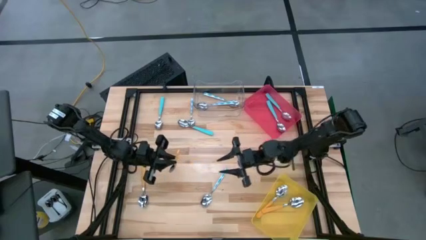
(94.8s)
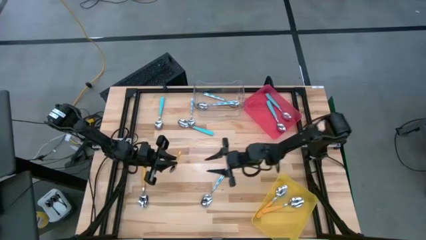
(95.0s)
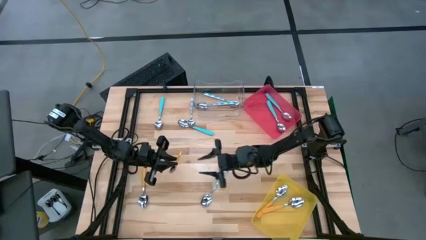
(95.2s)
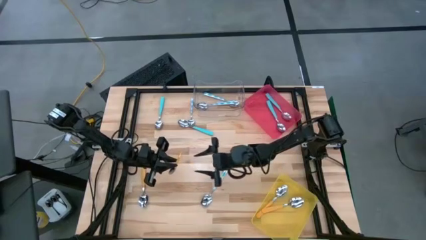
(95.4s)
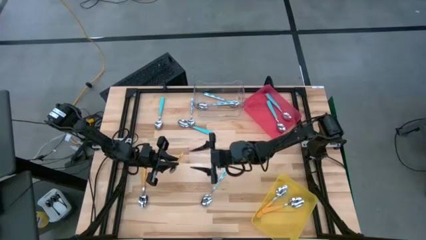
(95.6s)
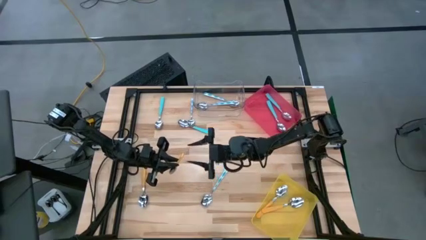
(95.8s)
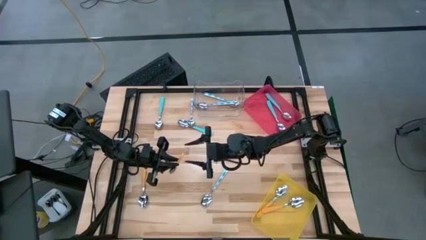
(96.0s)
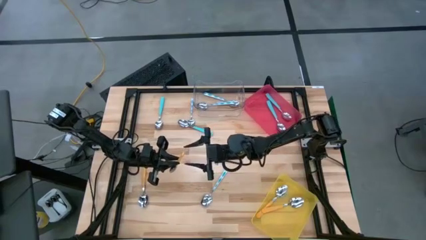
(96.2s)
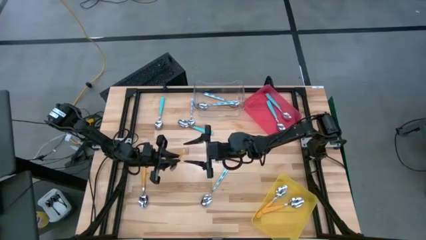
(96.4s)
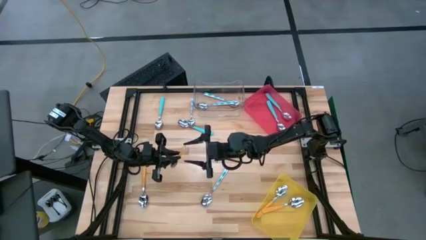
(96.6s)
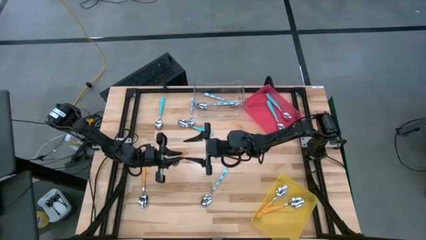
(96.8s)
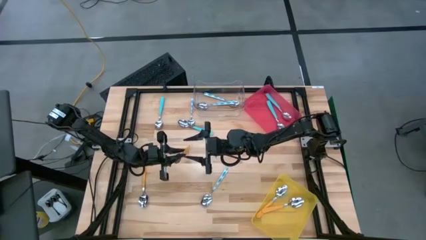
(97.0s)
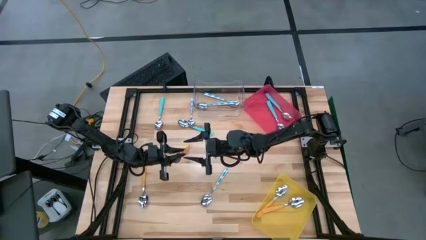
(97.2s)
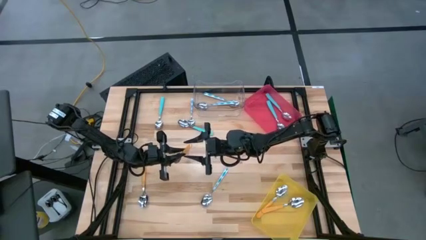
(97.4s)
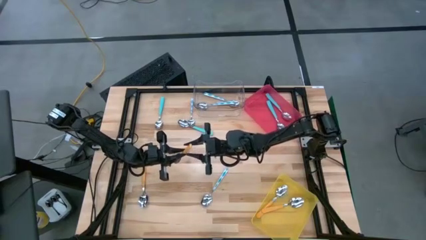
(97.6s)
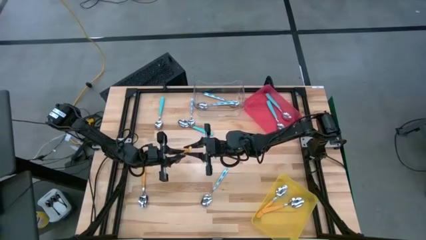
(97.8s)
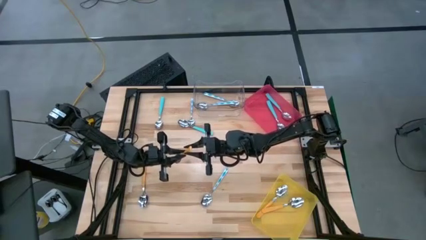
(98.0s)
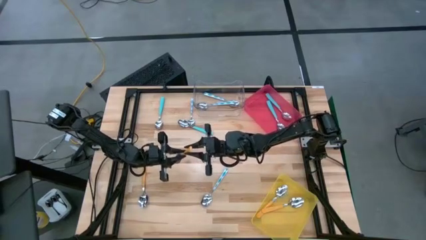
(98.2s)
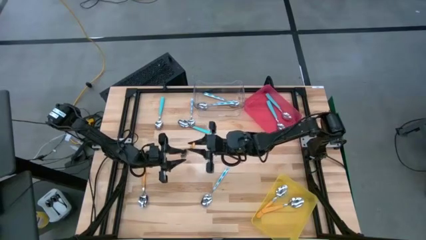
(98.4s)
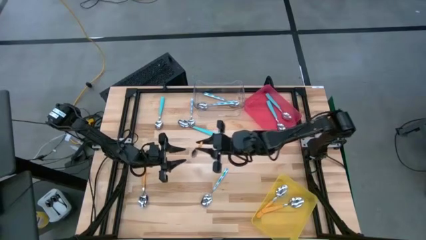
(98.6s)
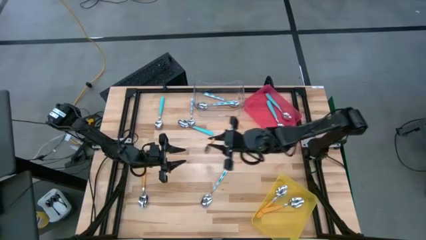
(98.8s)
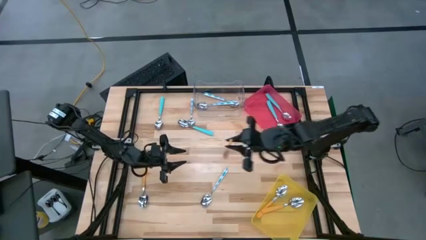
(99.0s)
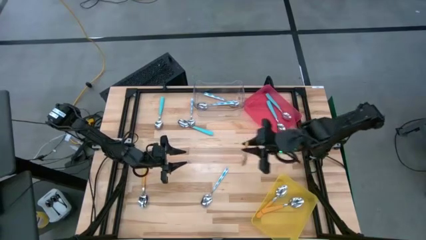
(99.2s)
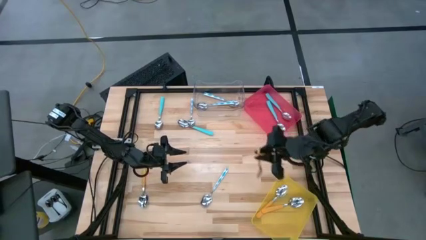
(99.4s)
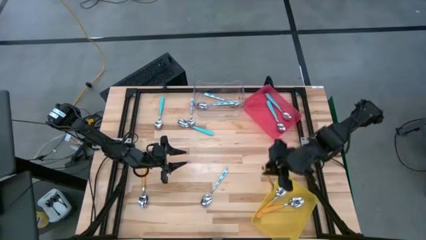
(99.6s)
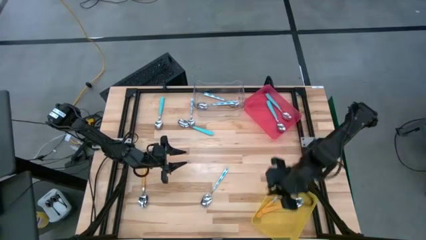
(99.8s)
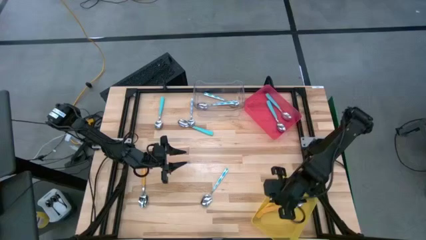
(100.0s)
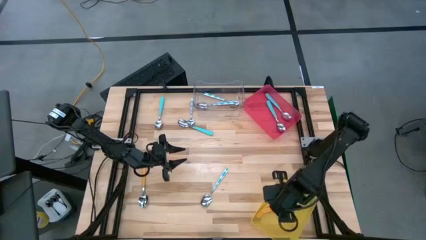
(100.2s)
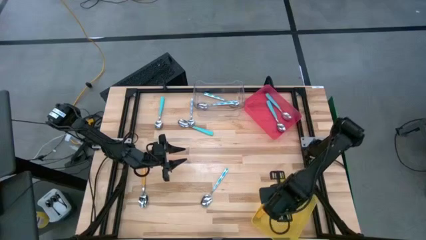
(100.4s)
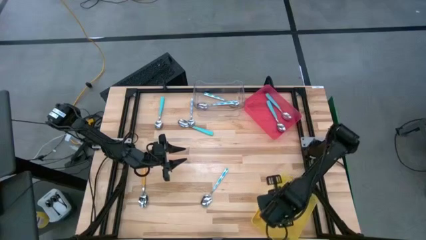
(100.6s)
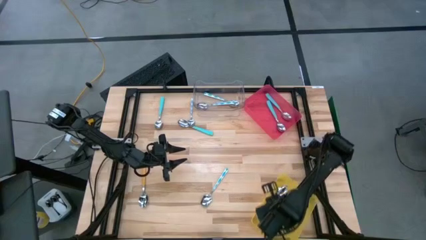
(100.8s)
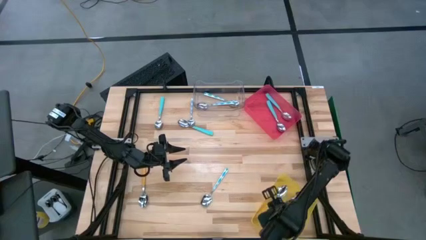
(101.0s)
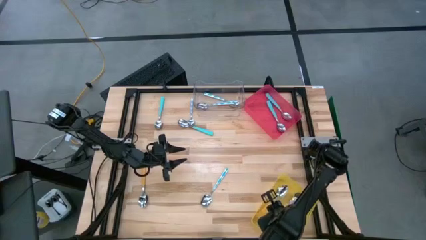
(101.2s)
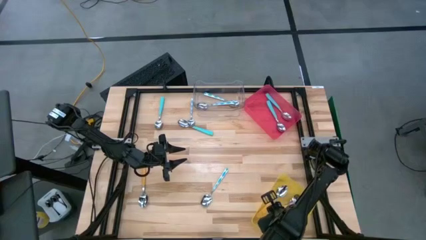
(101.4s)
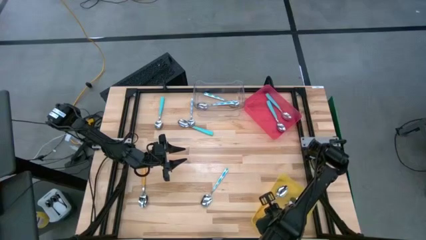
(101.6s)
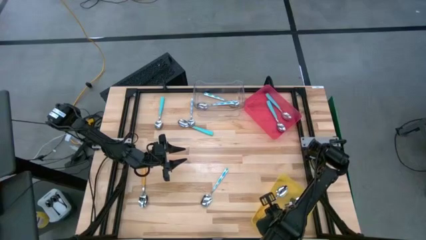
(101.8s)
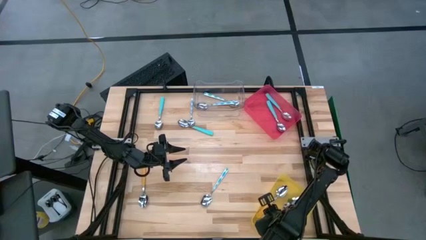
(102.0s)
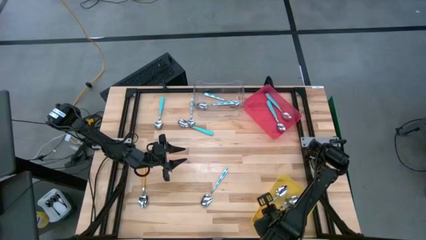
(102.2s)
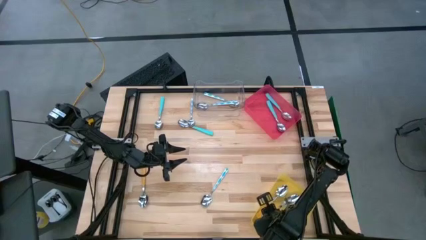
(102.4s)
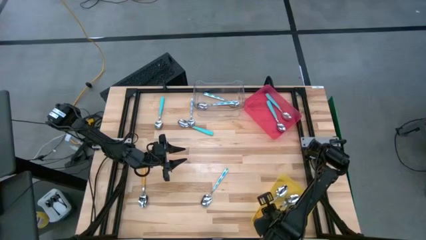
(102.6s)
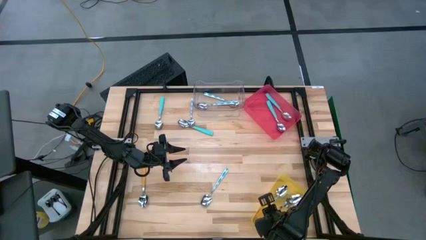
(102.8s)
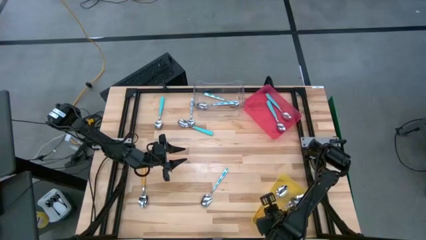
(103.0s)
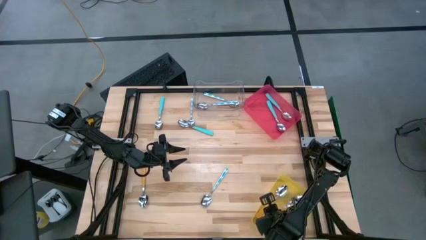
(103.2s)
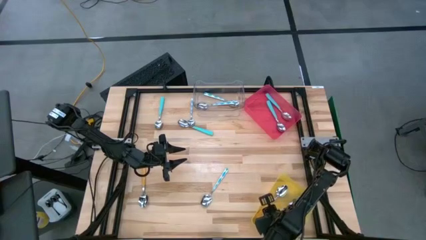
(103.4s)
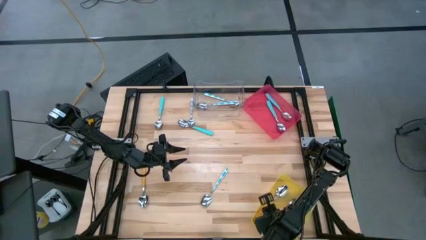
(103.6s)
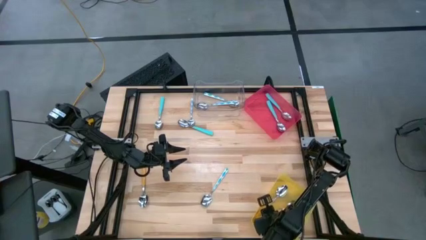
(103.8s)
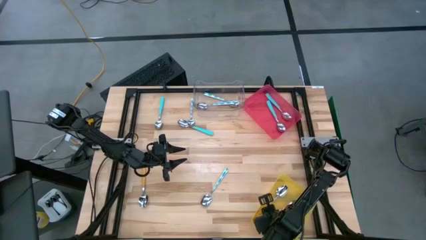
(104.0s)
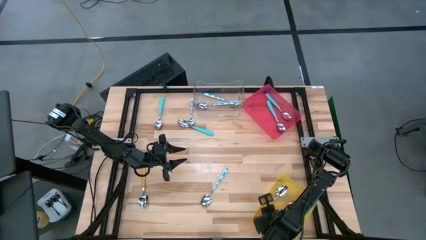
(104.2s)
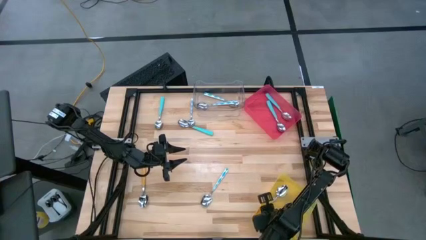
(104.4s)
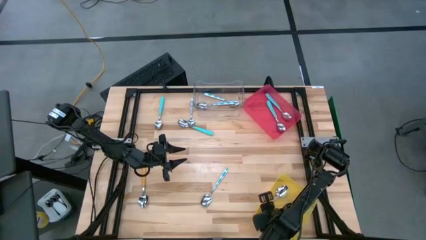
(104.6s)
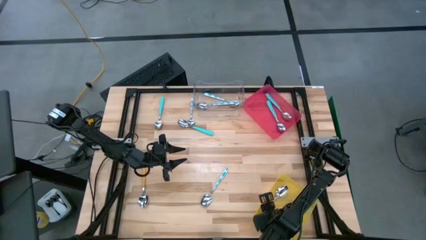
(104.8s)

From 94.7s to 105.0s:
Task: Sort silverware by color (type)
Put the orange spoon into the yellow bin

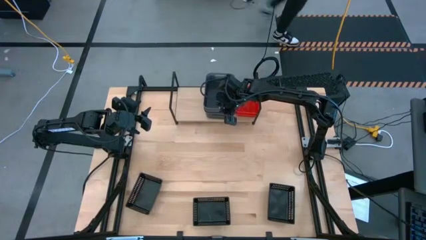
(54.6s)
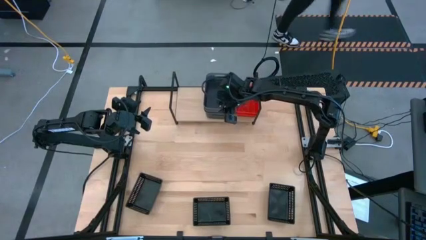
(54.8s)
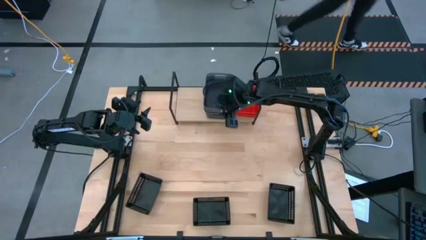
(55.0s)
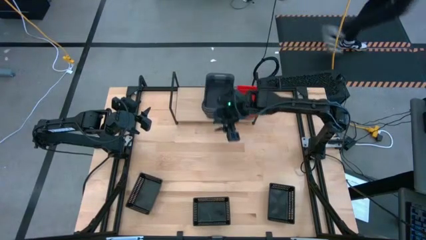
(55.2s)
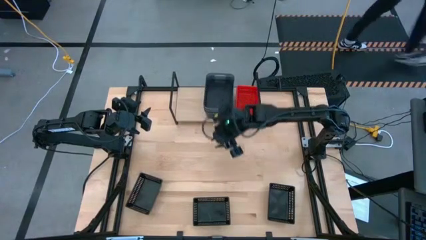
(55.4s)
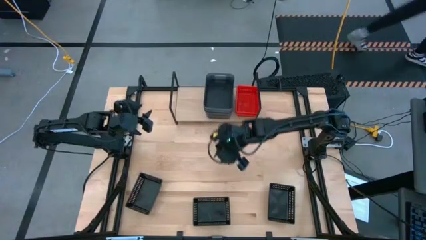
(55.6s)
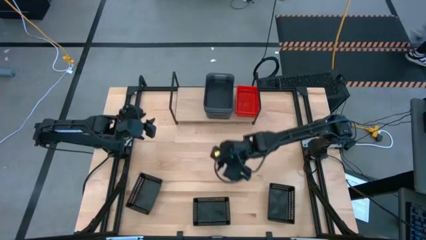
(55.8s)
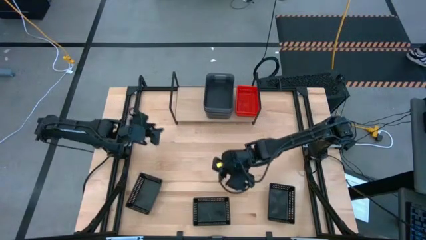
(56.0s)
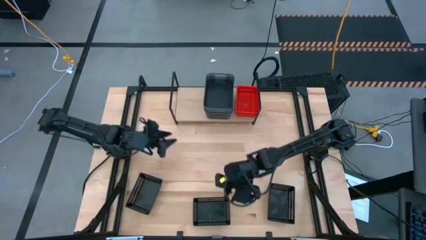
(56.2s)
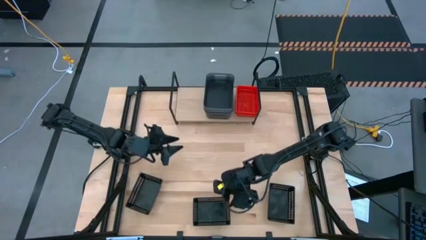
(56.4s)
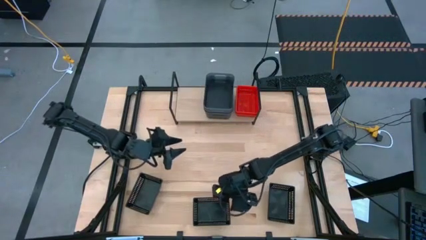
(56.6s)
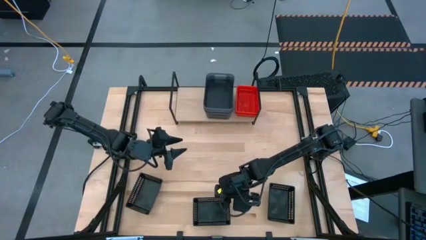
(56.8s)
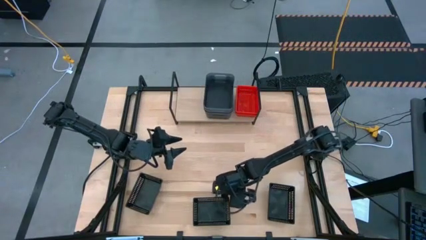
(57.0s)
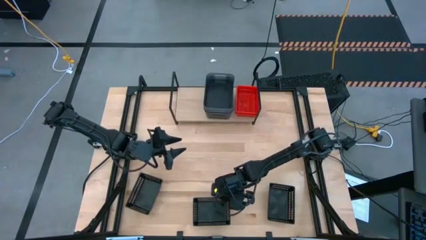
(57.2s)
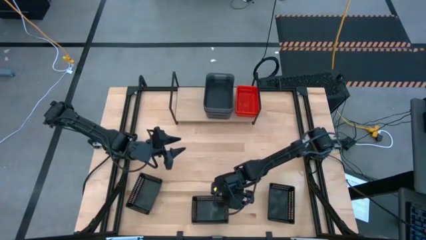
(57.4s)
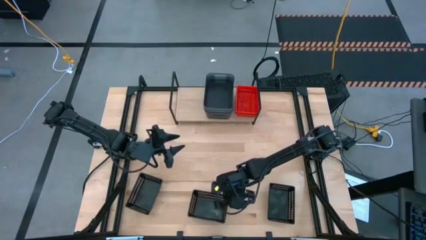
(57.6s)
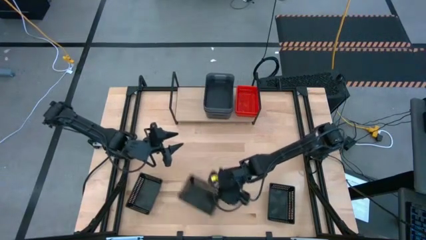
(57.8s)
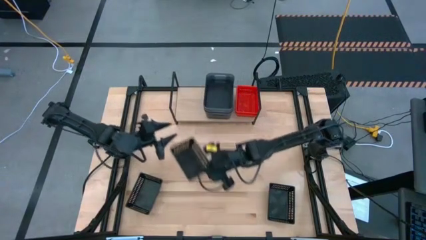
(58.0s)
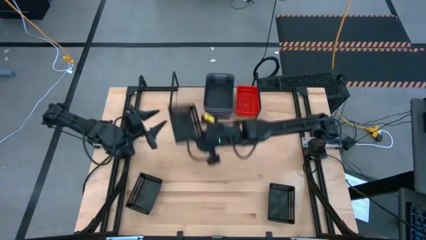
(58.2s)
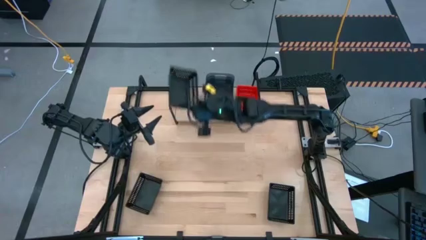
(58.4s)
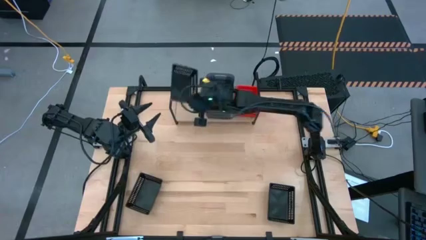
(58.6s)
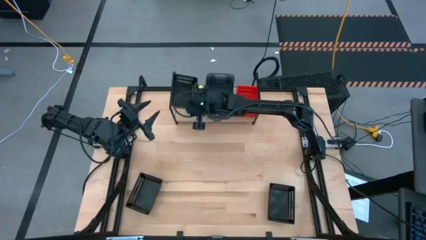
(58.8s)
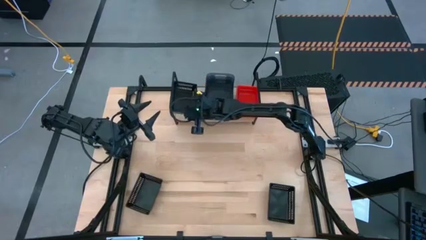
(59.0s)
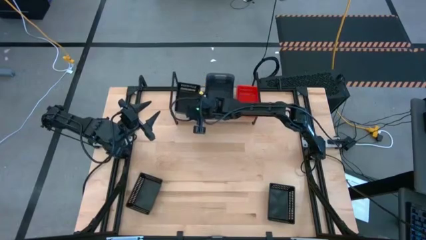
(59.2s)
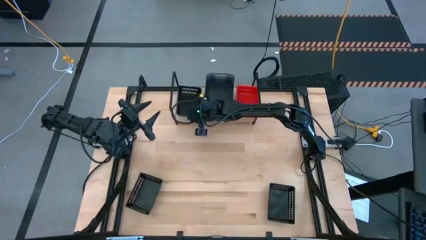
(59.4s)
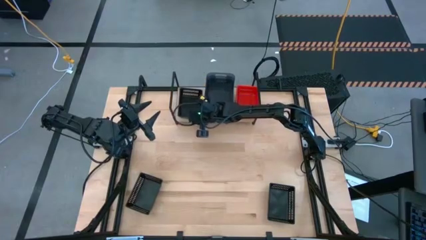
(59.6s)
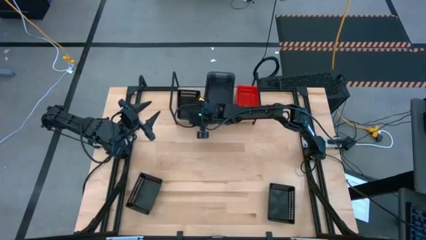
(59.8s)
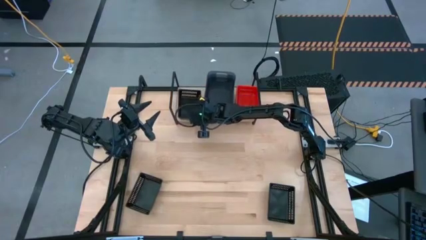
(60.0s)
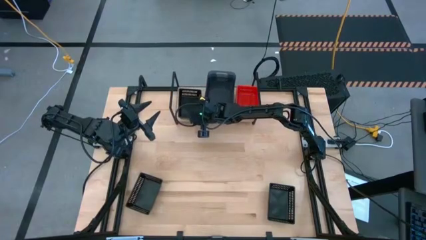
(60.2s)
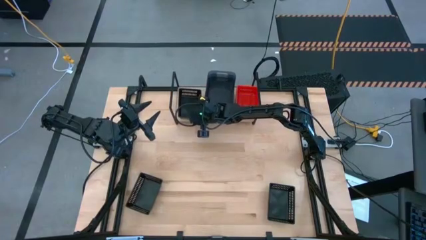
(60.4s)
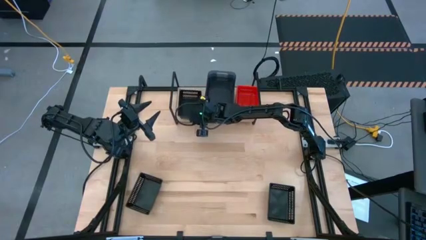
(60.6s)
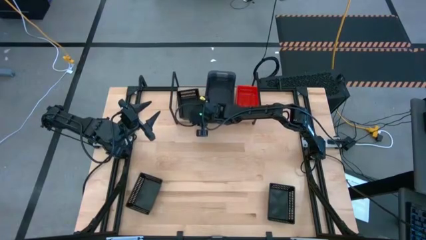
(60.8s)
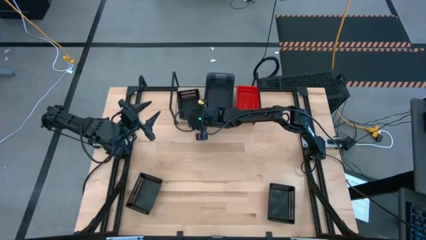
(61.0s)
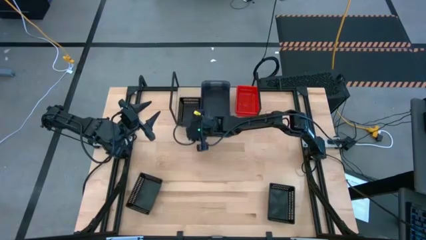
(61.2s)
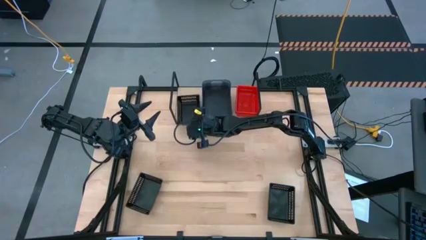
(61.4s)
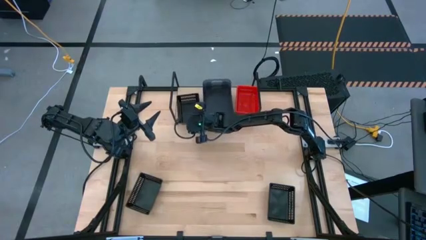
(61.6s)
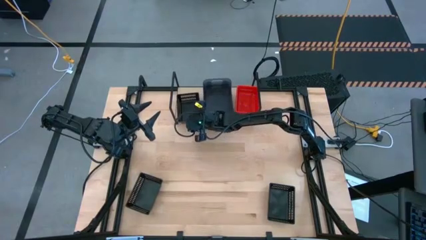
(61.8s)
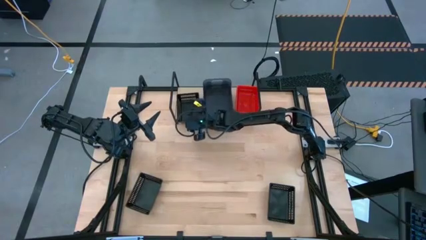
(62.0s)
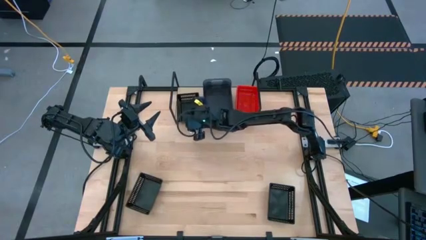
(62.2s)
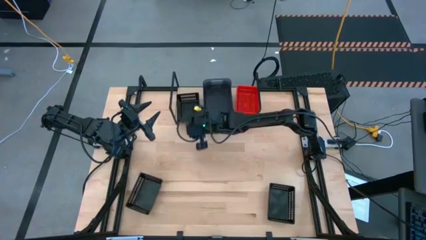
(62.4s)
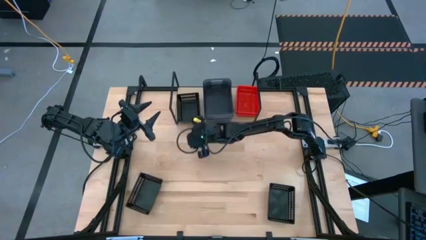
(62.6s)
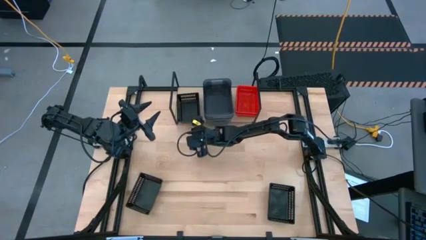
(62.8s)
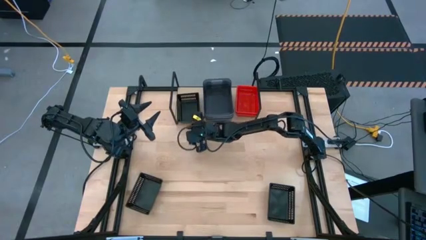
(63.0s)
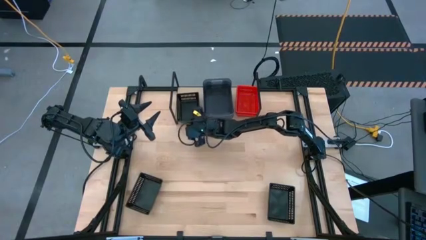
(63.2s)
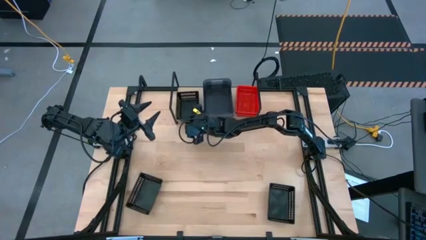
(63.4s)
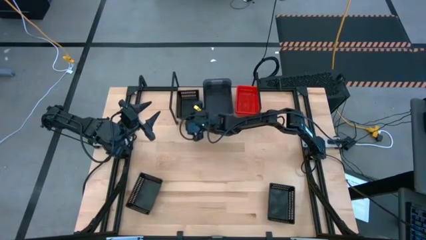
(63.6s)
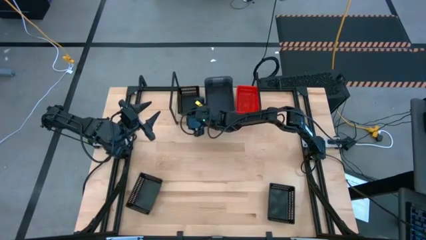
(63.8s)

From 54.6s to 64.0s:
Task: Stack baskets on shelf by color
Put the middle black bin on the shelf
